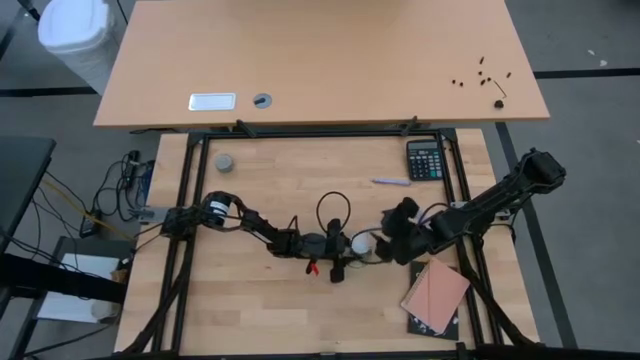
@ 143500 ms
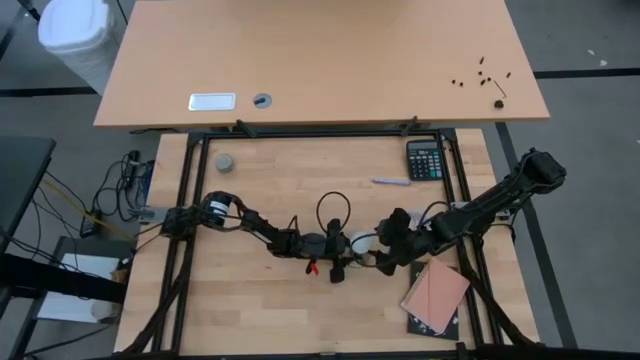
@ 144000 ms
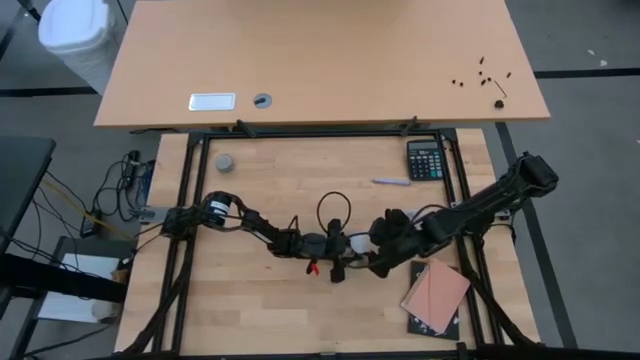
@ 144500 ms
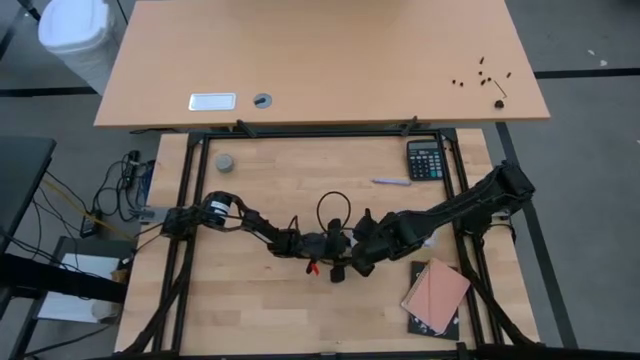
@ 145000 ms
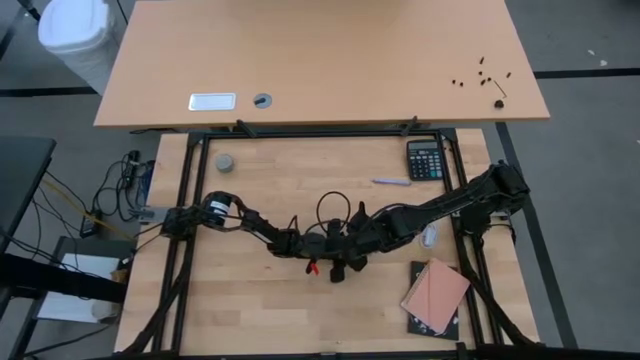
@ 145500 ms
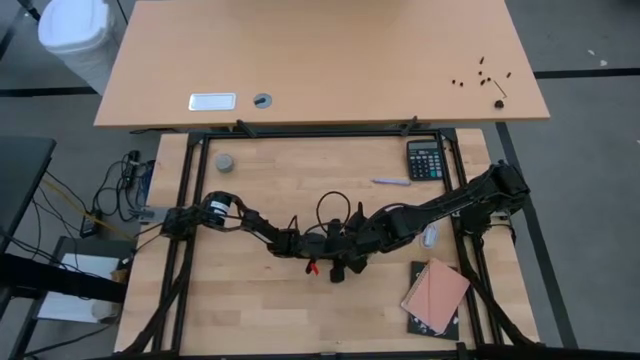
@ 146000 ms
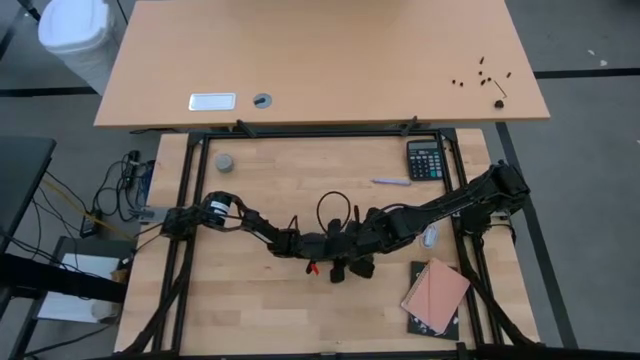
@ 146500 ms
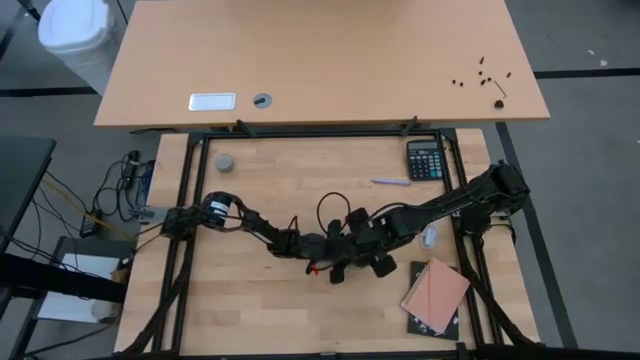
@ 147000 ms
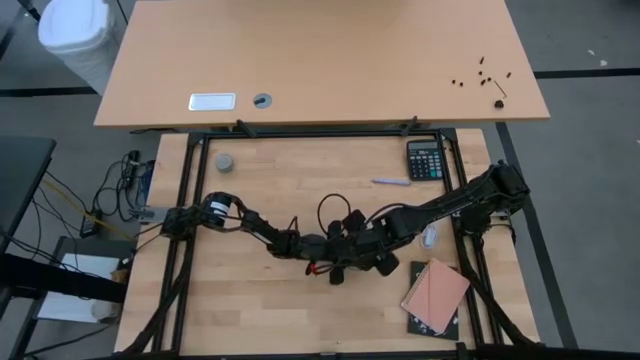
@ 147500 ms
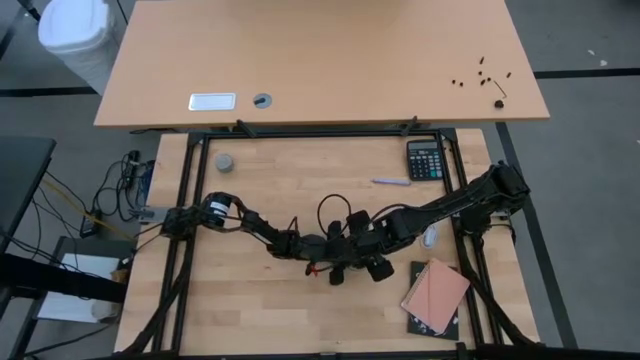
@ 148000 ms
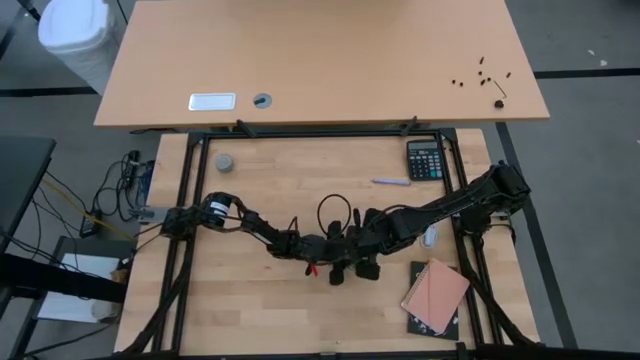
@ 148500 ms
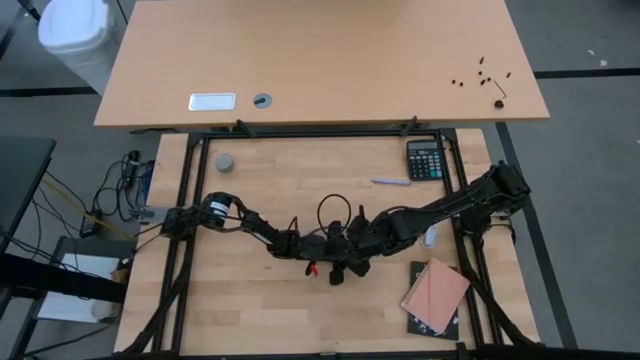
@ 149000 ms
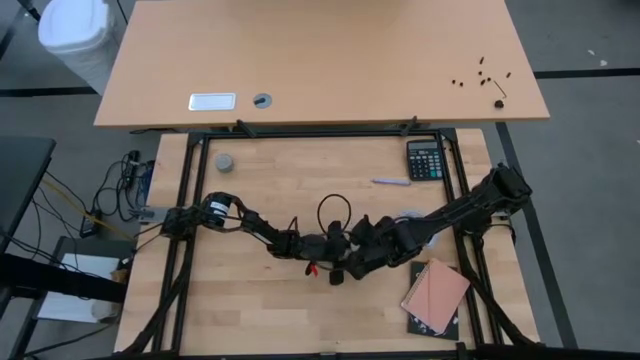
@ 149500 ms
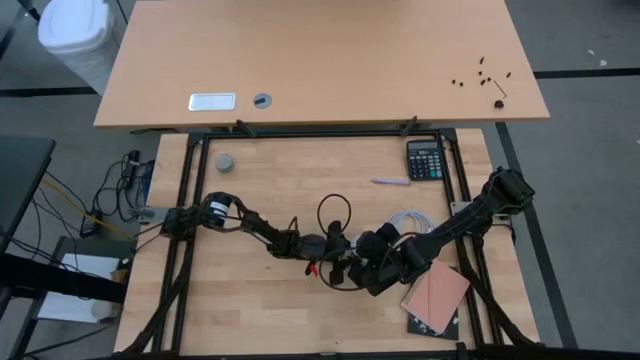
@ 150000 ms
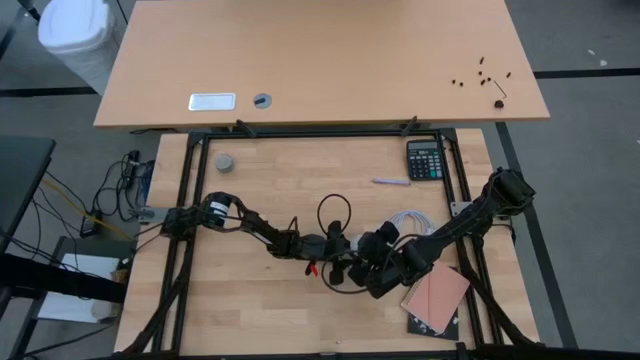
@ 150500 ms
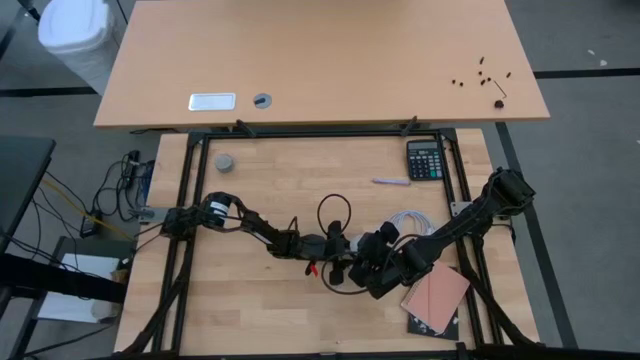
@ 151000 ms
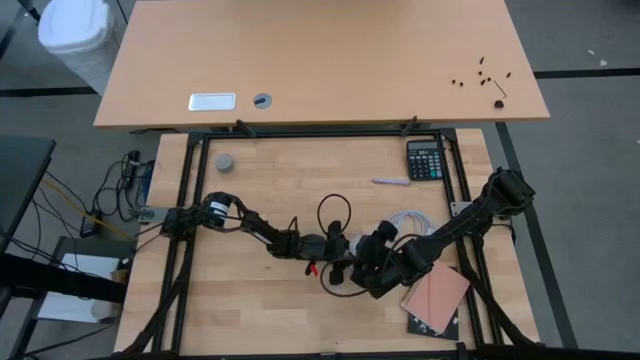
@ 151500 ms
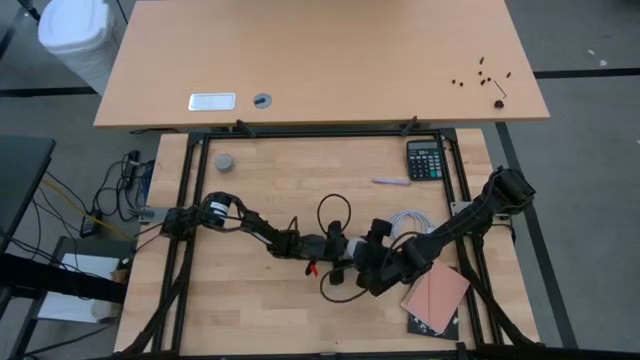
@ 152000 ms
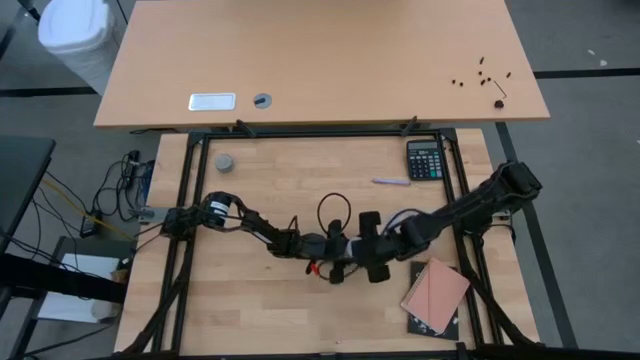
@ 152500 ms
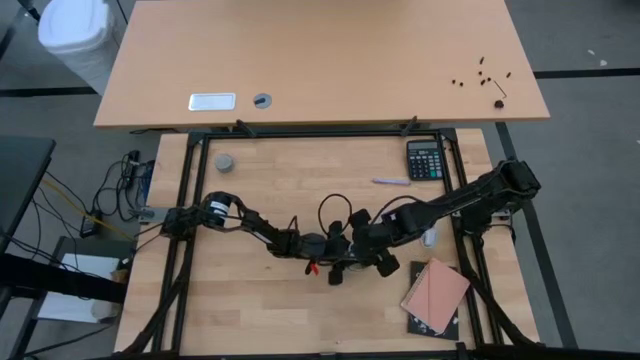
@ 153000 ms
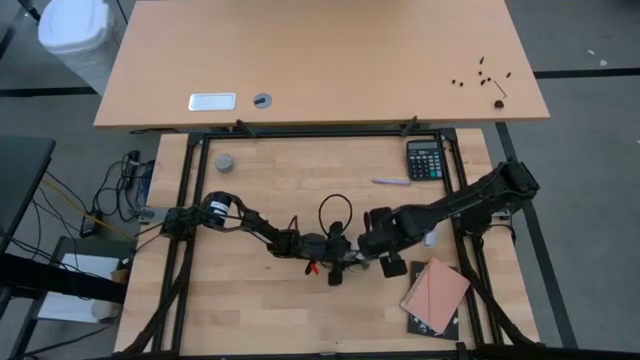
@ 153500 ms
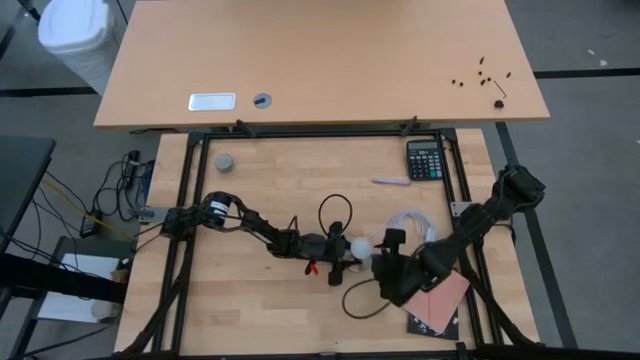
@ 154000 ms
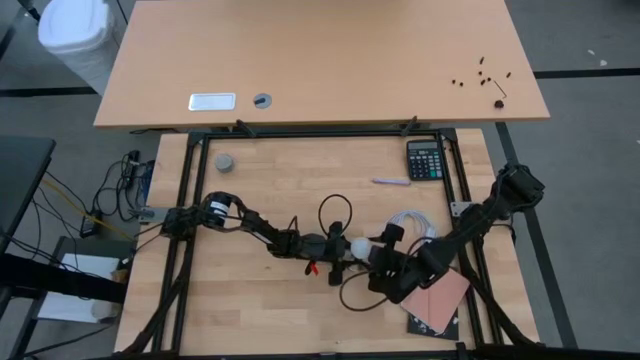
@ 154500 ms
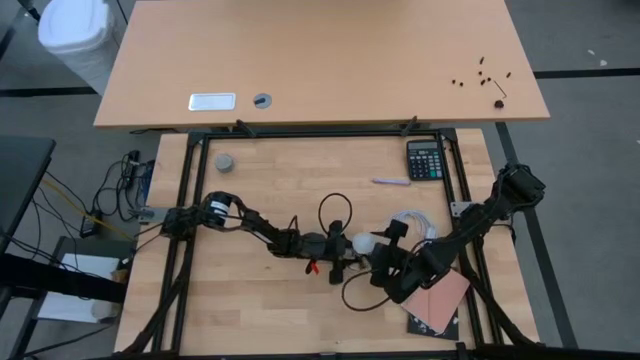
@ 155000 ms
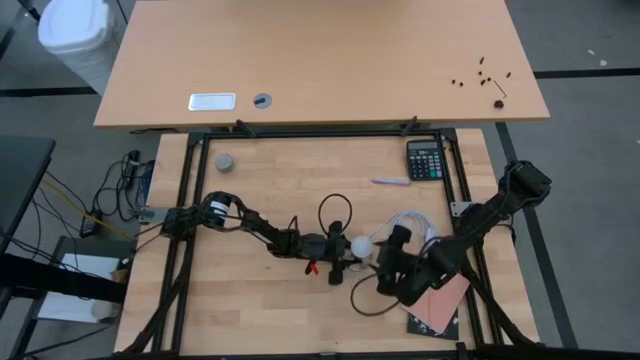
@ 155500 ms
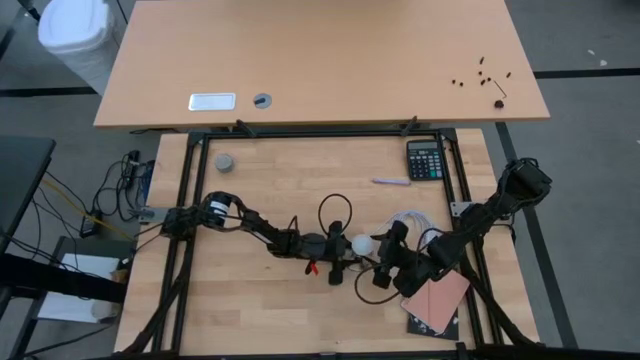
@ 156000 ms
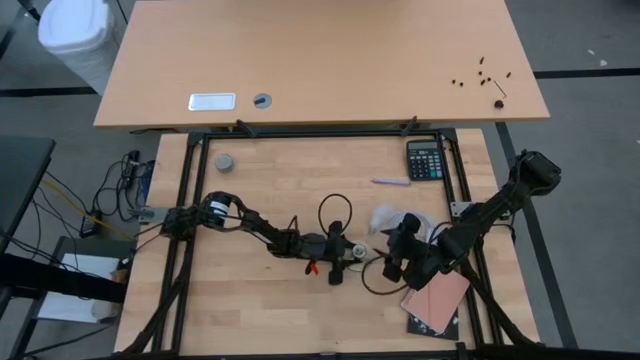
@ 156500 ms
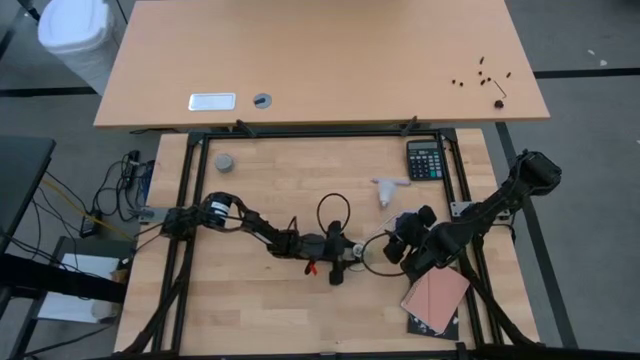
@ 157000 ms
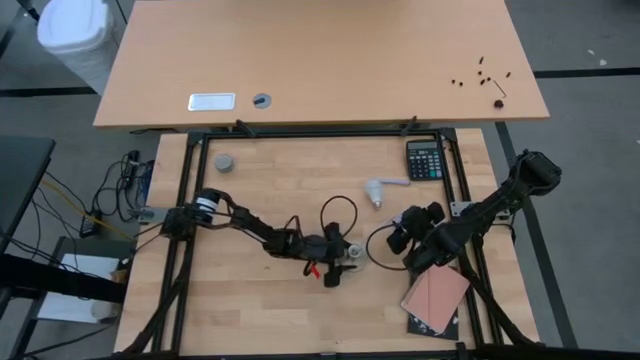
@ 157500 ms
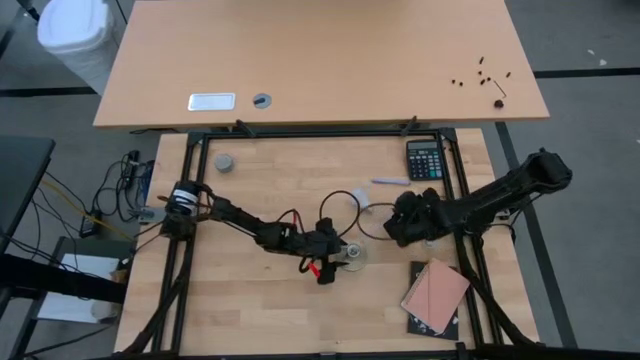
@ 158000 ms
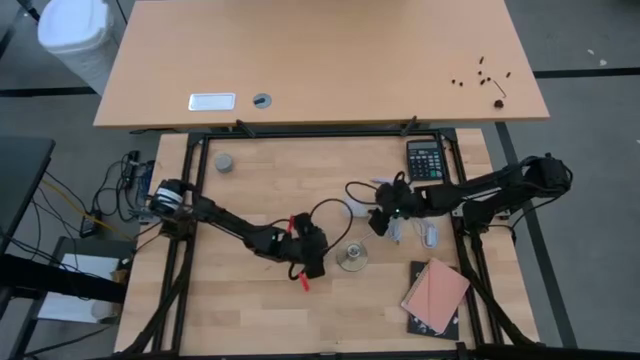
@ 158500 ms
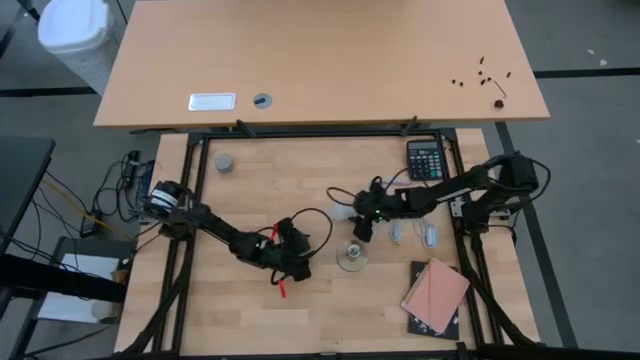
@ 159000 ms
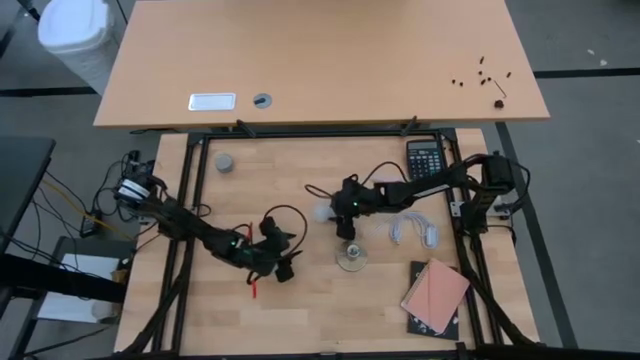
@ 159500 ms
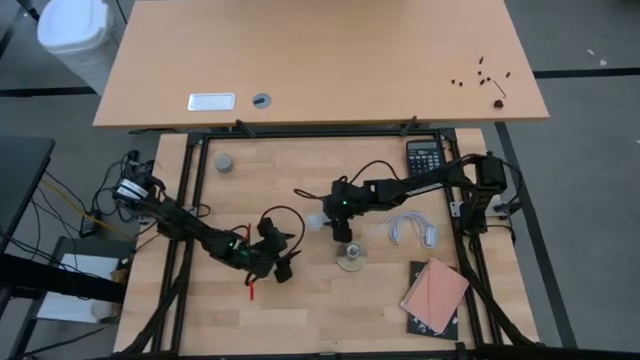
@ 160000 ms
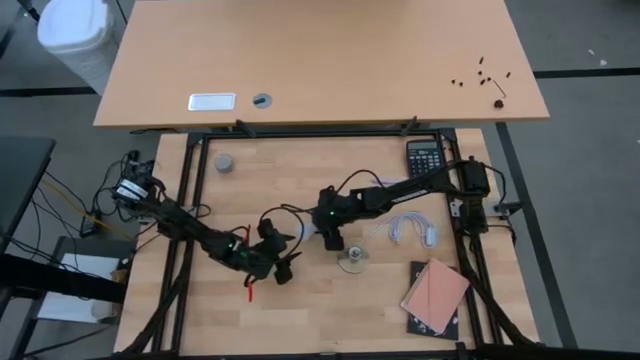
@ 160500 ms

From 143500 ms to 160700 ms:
Task: Screw lightbulb
Remove the lightbulb from the bronze lamp socket

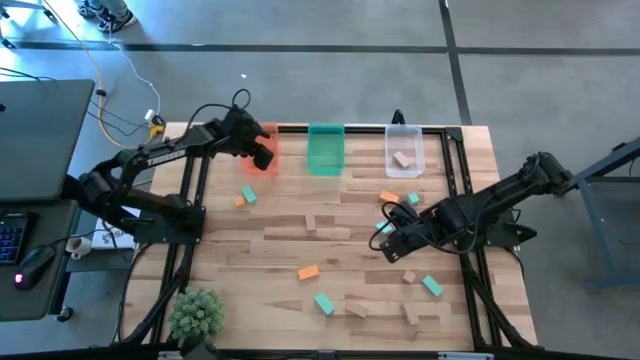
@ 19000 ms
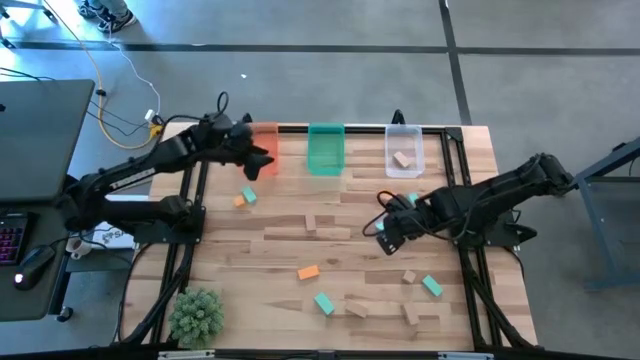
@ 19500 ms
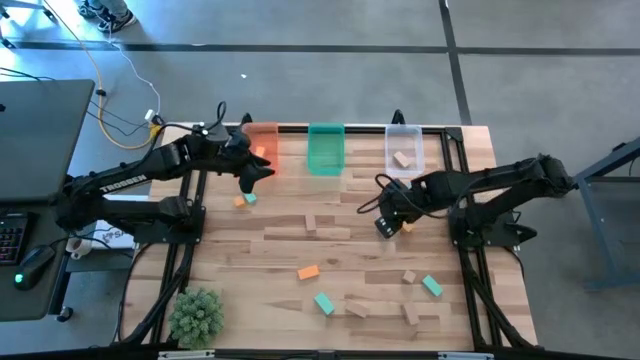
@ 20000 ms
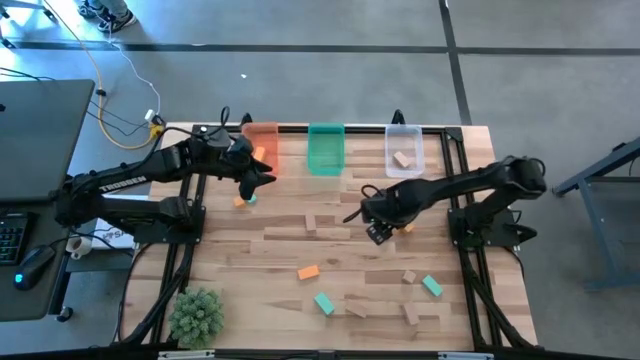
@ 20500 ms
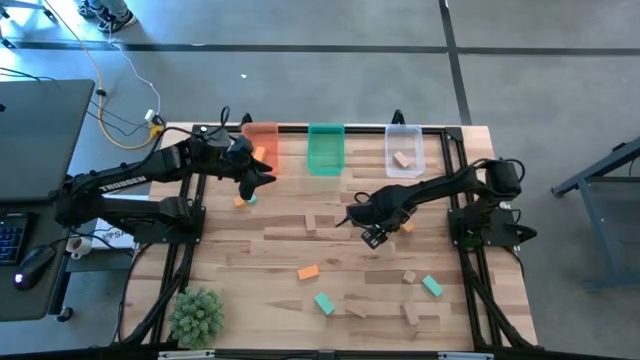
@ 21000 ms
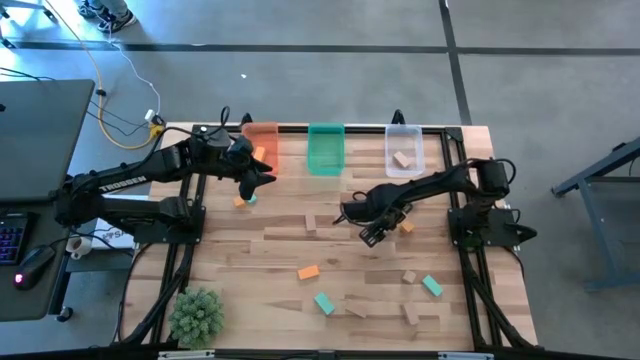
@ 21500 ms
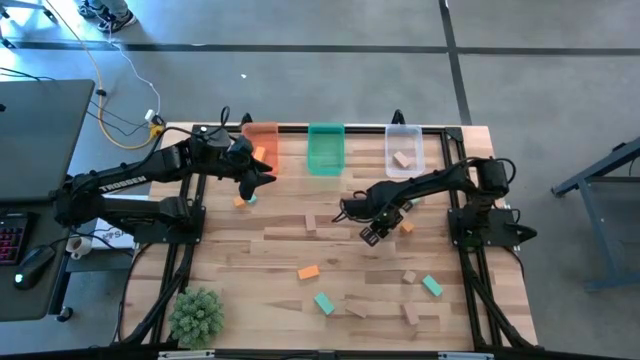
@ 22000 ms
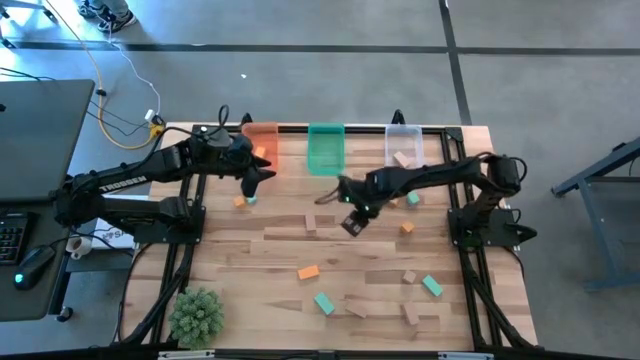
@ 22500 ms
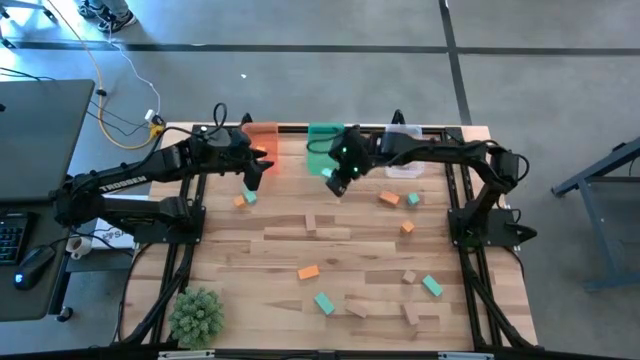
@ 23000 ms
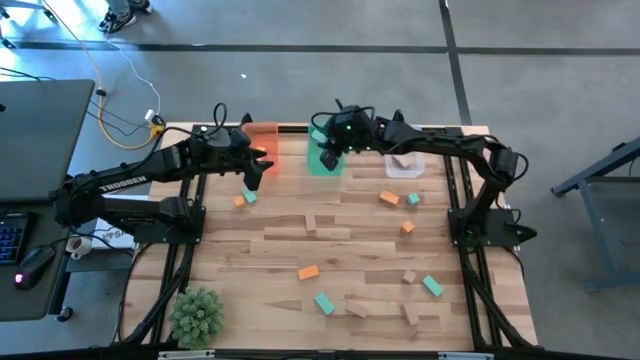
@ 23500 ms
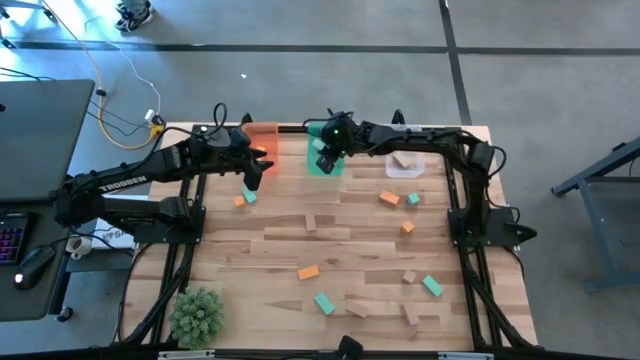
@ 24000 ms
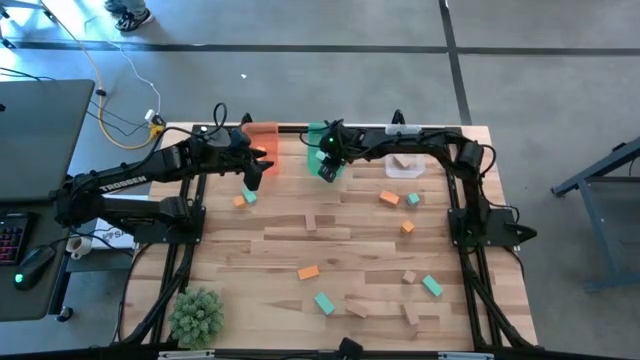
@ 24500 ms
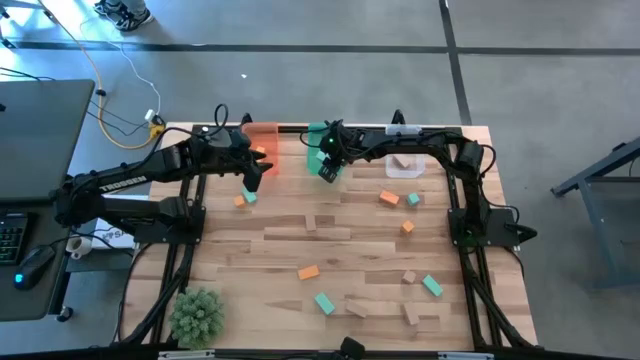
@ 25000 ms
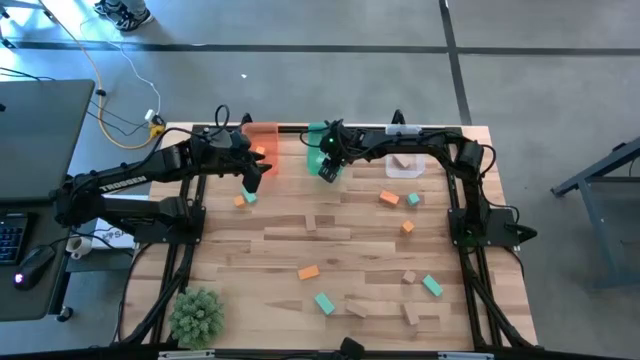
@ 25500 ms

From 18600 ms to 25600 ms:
Task: Sort & place blocks by color
Put the blue block into the green bin
